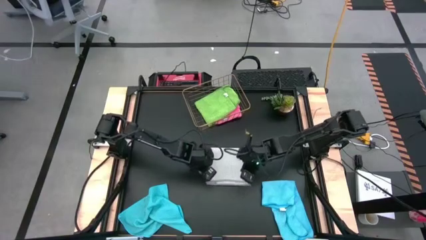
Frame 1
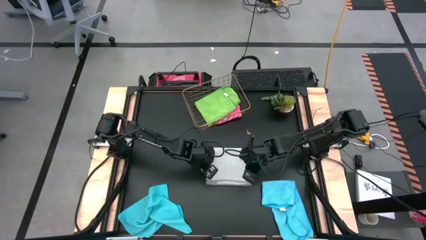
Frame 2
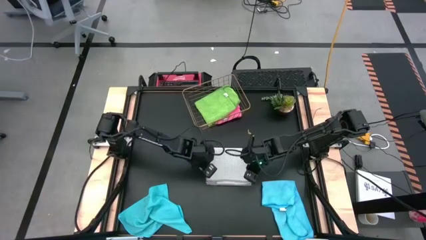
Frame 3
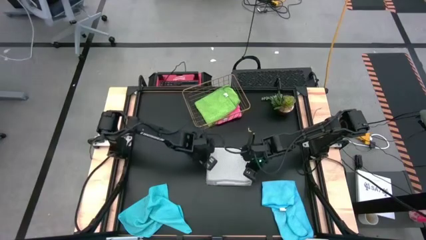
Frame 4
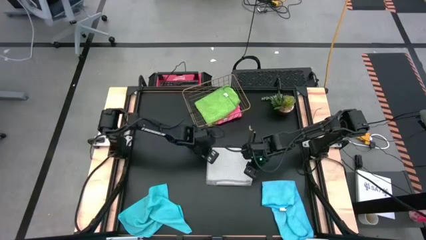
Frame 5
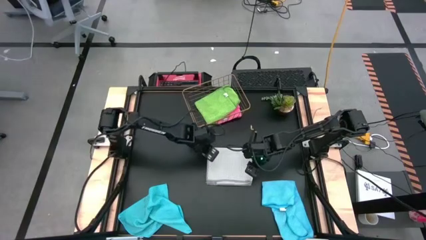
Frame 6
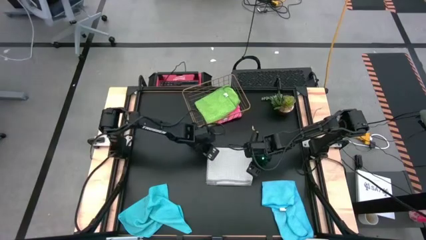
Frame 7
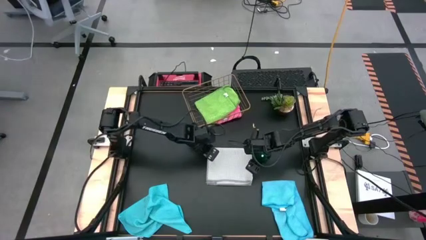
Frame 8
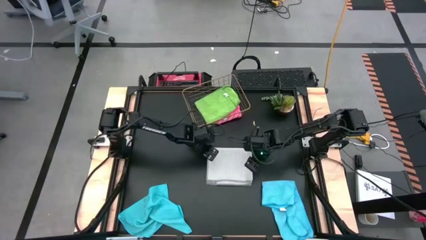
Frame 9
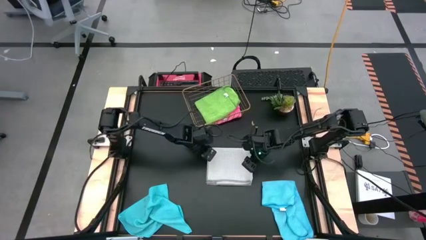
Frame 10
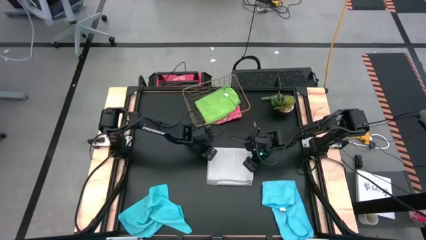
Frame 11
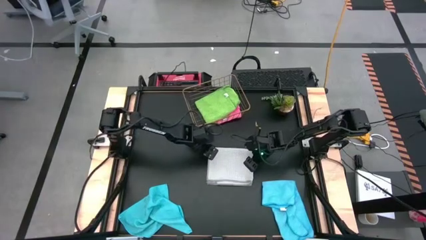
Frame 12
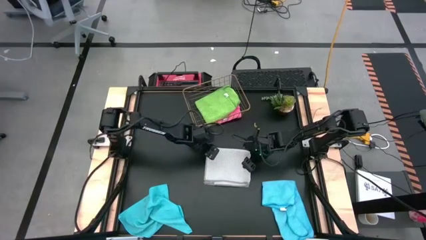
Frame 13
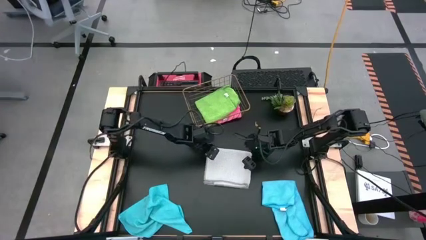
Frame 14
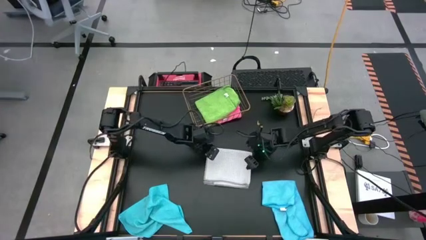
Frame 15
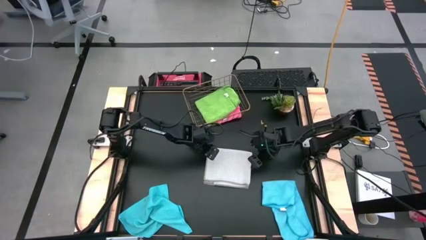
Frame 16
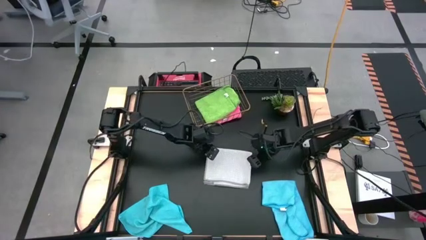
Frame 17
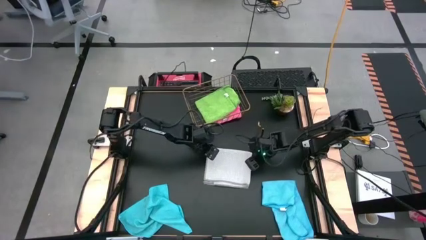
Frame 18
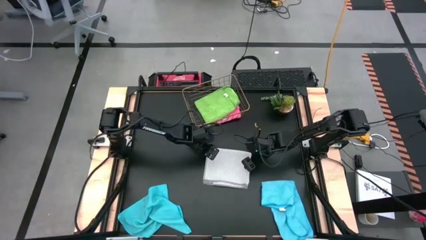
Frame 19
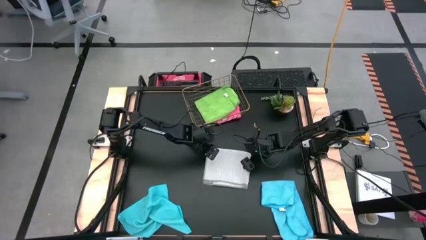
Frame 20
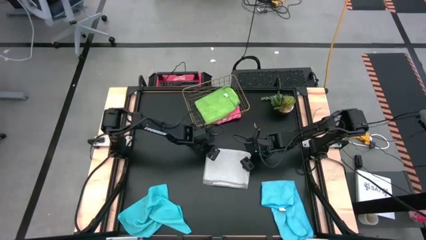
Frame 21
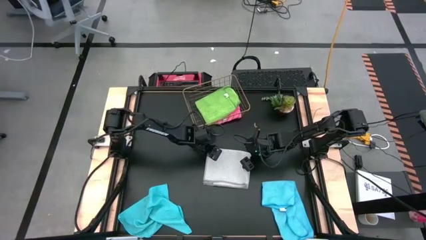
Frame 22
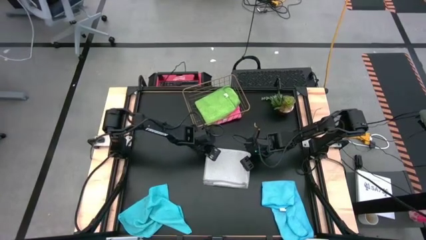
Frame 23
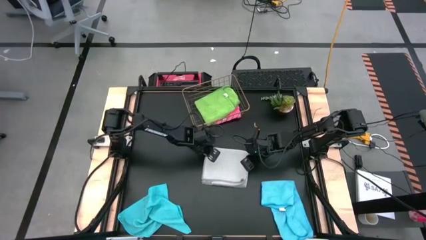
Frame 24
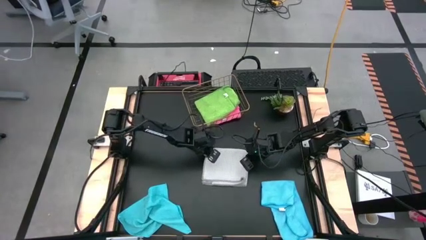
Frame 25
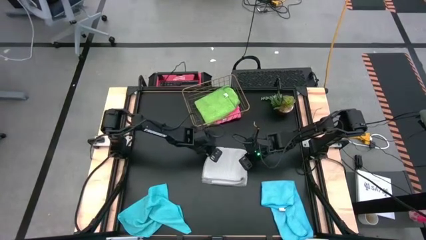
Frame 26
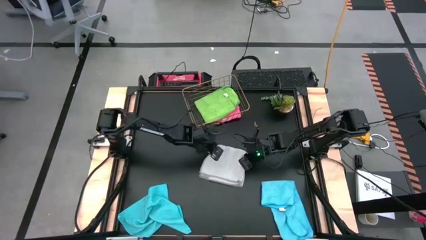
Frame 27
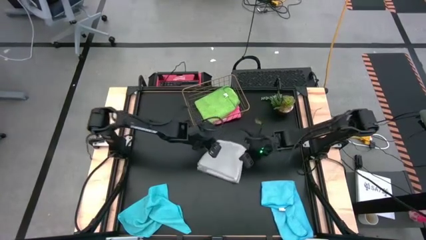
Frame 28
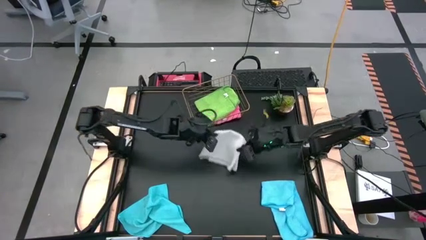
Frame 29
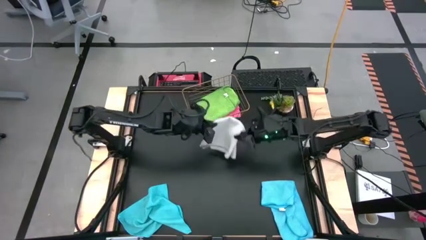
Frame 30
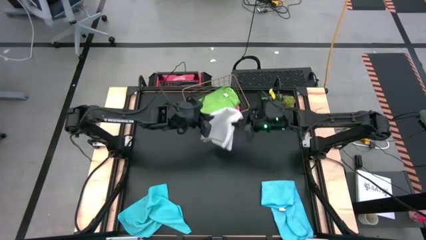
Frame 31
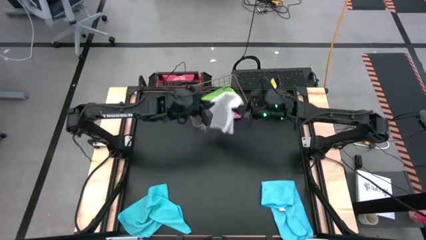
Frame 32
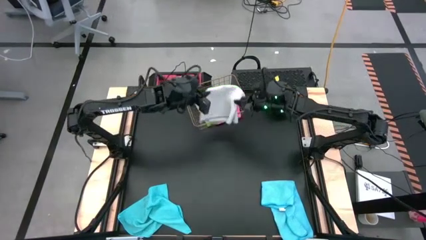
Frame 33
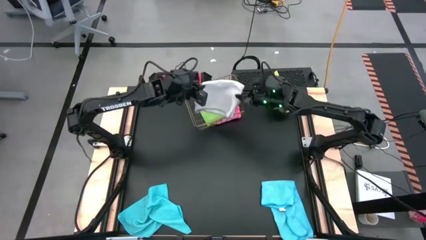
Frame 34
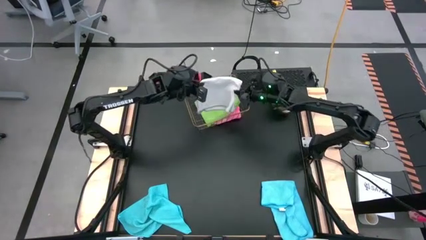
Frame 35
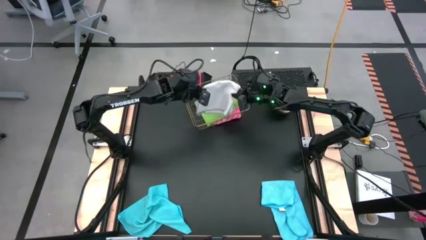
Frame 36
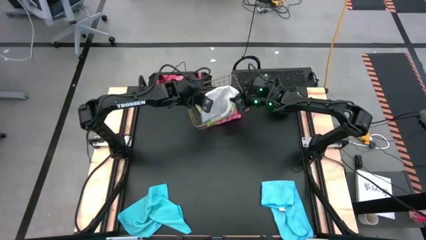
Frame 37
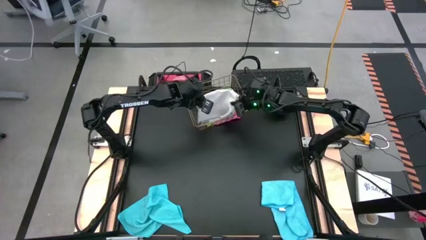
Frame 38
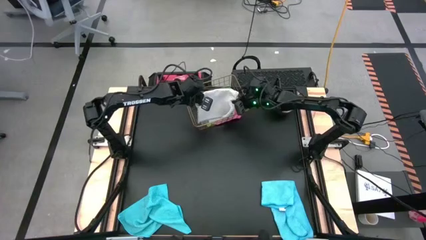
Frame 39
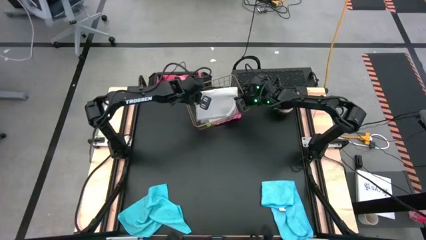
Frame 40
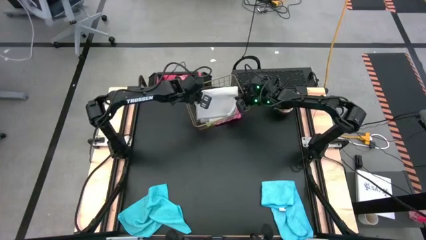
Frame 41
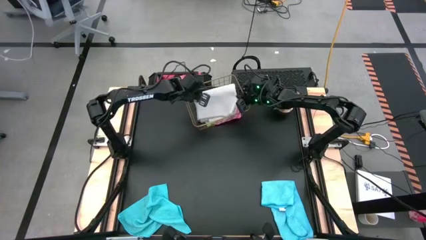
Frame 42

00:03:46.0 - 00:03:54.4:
Task: Fold microfiber towels
Stack the gray microfiber cloth on top of the green microfiber cloth in the wire basket

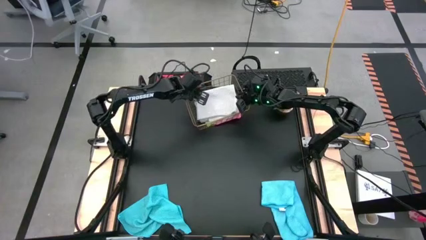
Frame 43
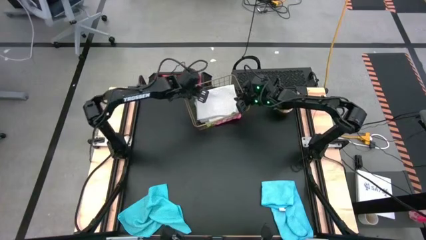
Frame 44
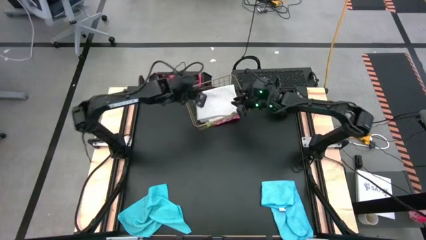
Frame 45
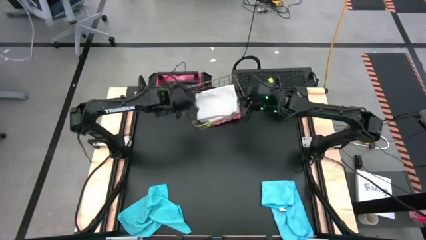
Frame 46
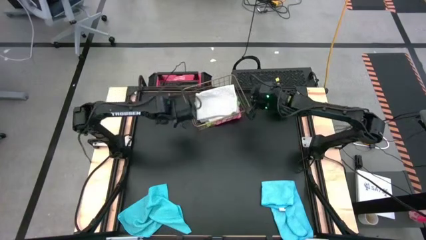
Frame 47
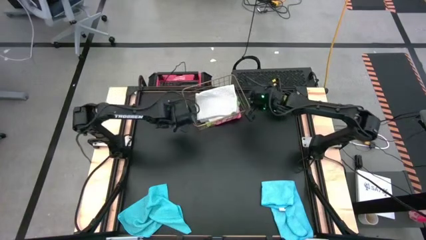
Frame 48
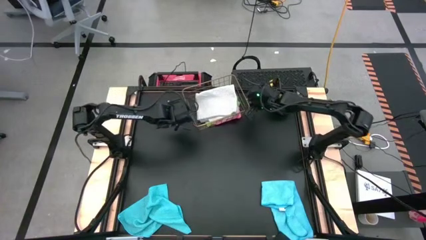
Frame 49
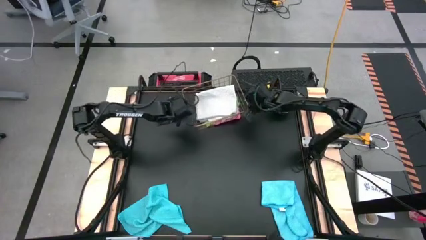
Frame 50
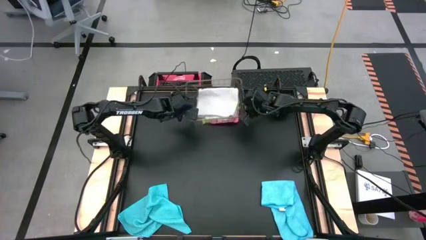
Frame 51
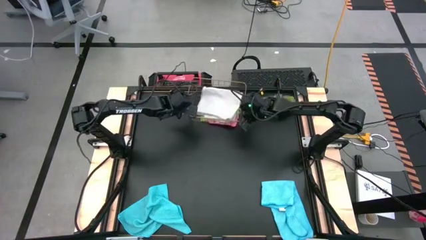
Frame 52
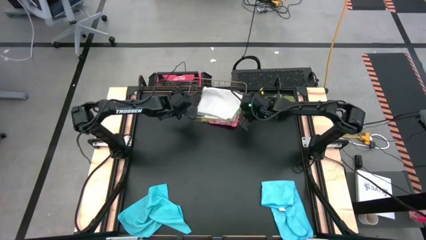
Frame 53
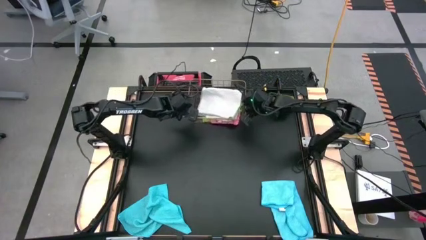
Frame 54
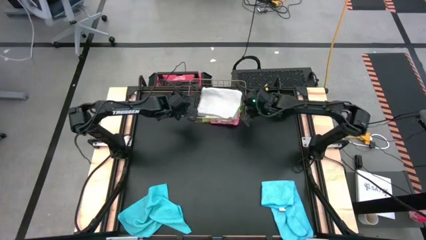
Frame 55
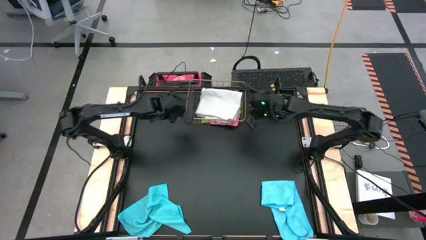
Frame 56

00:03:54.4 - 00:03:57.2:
Adjust the wire basket
